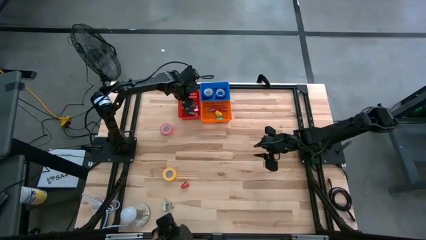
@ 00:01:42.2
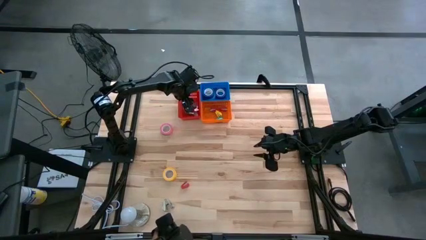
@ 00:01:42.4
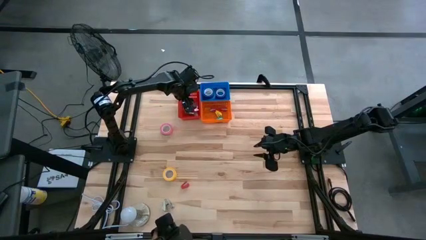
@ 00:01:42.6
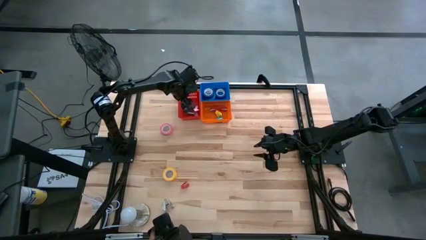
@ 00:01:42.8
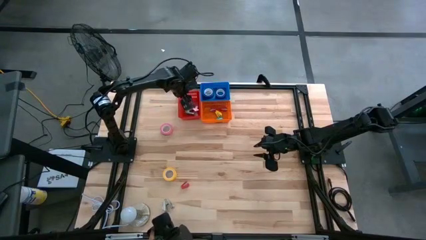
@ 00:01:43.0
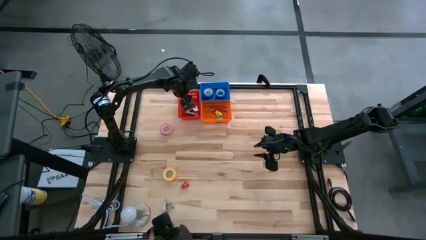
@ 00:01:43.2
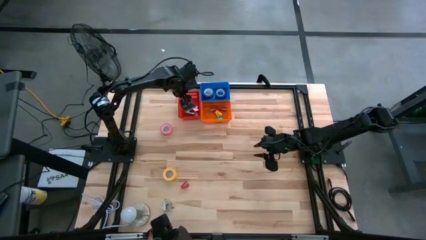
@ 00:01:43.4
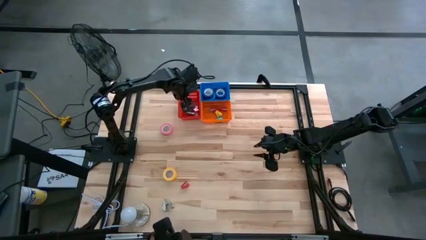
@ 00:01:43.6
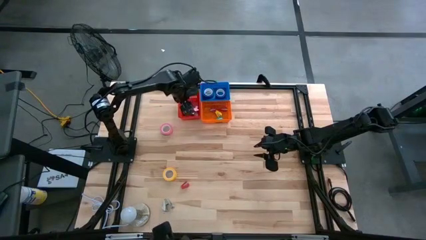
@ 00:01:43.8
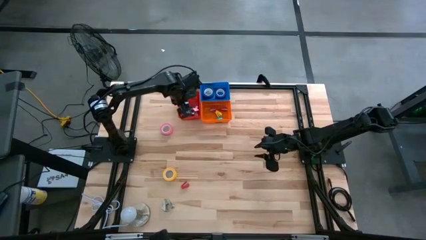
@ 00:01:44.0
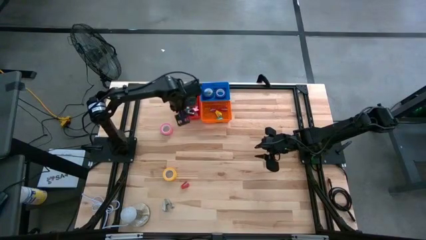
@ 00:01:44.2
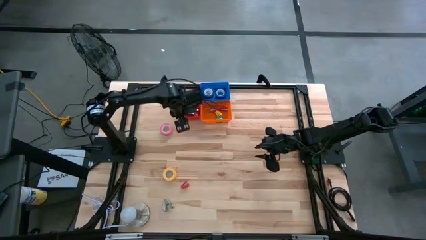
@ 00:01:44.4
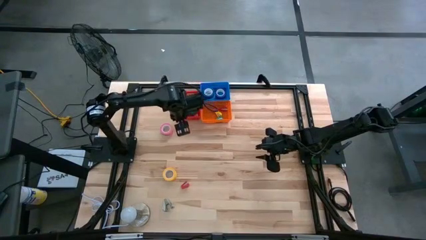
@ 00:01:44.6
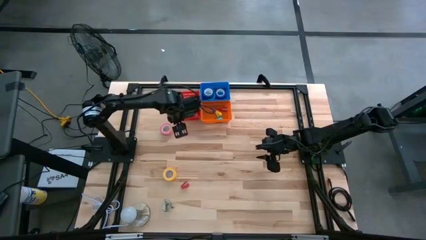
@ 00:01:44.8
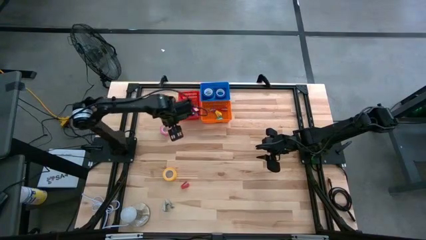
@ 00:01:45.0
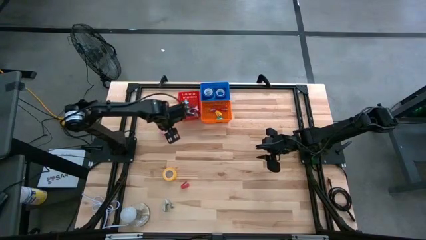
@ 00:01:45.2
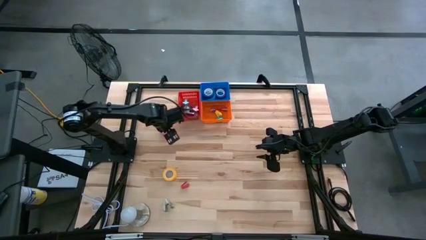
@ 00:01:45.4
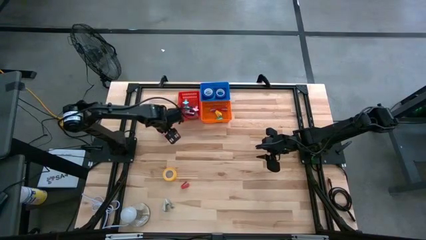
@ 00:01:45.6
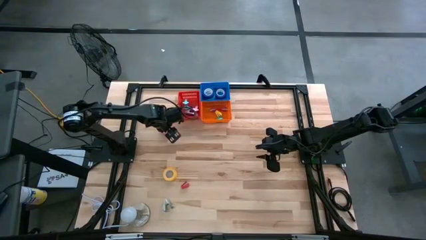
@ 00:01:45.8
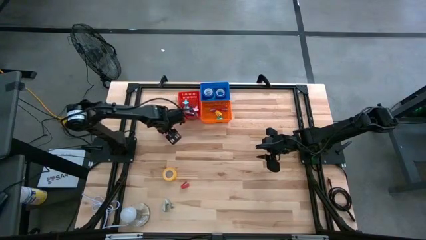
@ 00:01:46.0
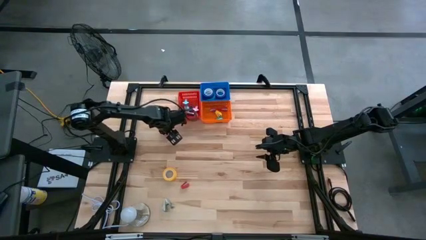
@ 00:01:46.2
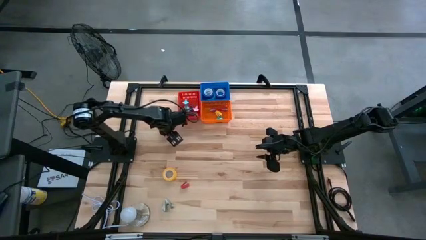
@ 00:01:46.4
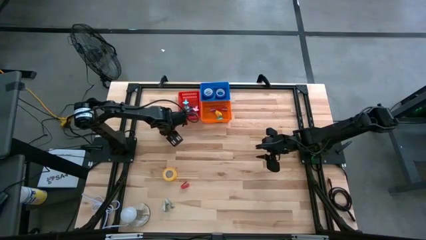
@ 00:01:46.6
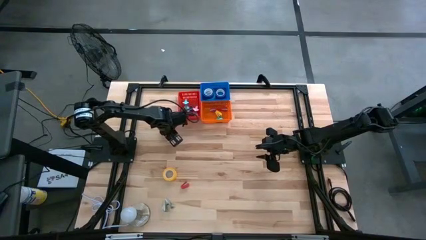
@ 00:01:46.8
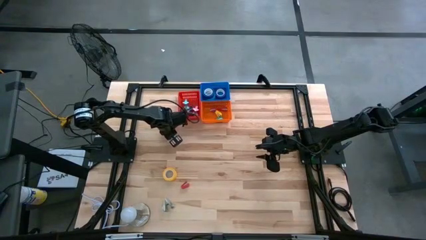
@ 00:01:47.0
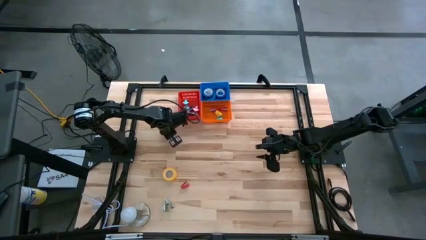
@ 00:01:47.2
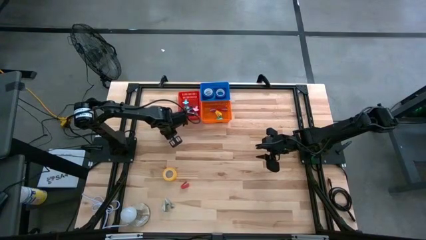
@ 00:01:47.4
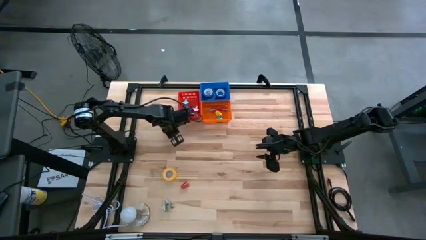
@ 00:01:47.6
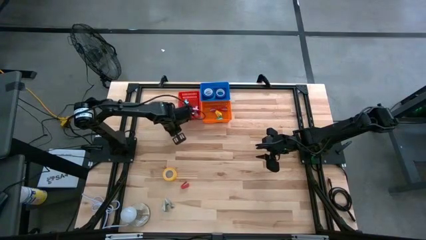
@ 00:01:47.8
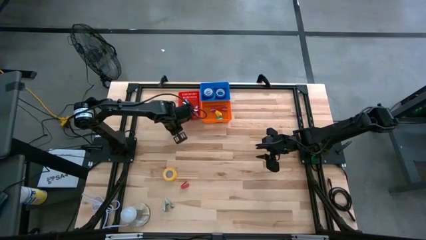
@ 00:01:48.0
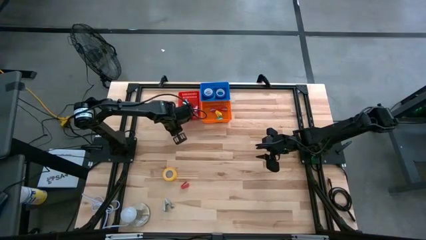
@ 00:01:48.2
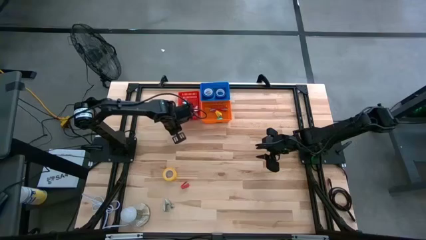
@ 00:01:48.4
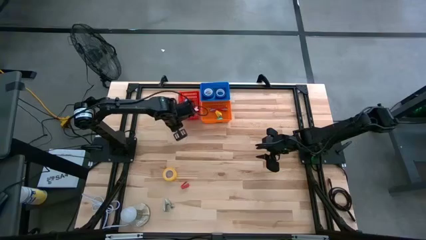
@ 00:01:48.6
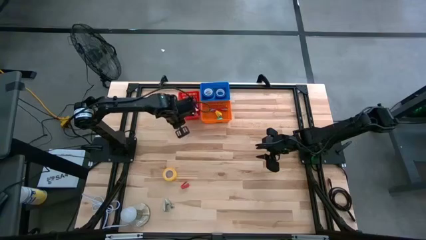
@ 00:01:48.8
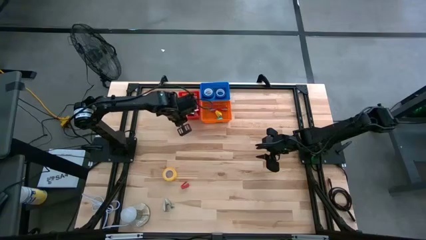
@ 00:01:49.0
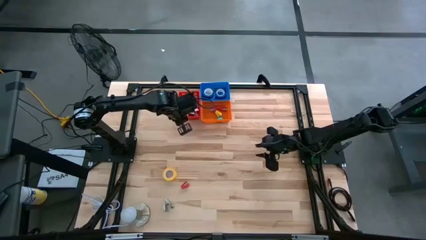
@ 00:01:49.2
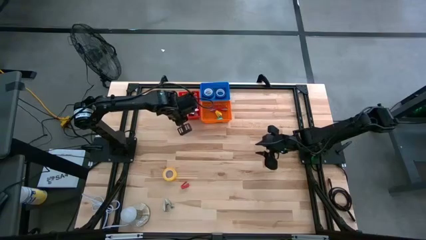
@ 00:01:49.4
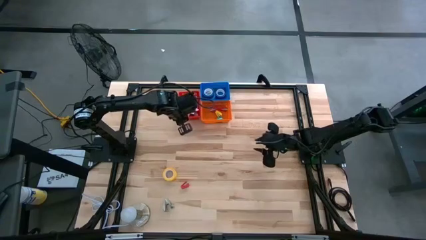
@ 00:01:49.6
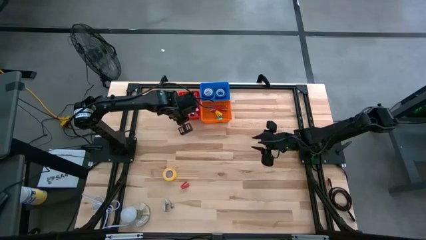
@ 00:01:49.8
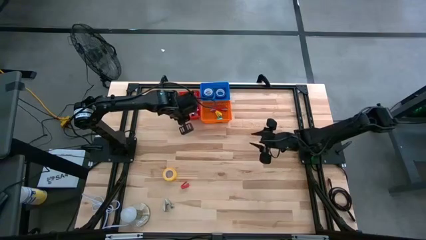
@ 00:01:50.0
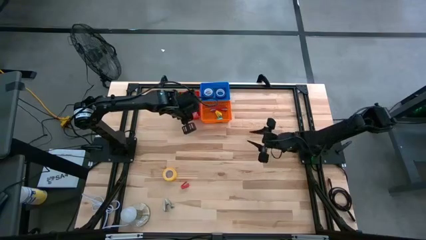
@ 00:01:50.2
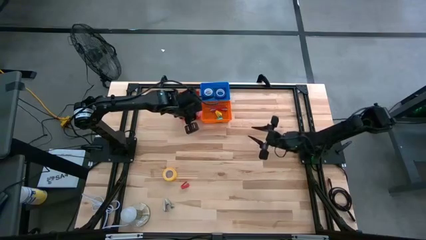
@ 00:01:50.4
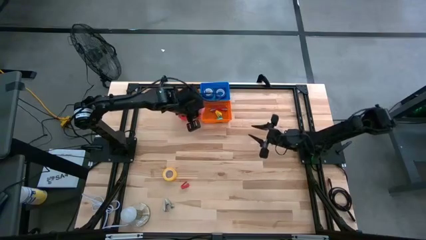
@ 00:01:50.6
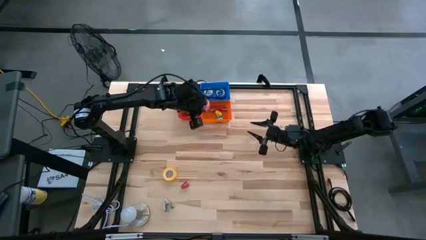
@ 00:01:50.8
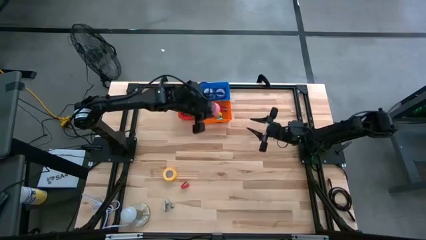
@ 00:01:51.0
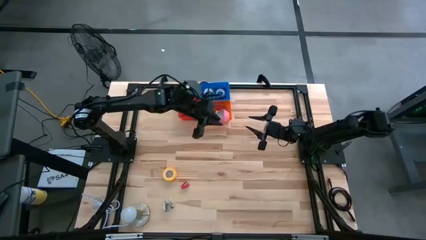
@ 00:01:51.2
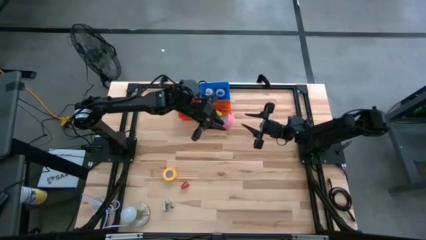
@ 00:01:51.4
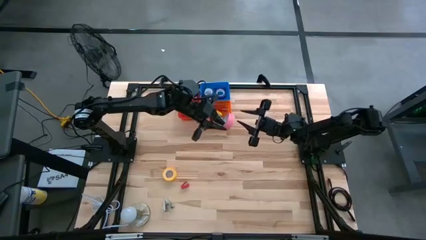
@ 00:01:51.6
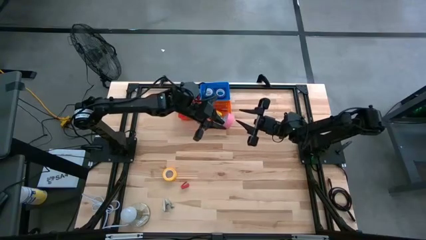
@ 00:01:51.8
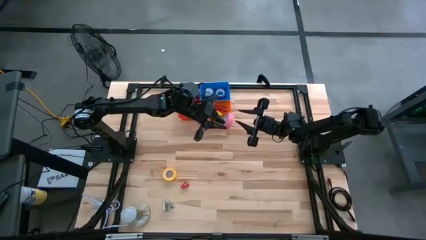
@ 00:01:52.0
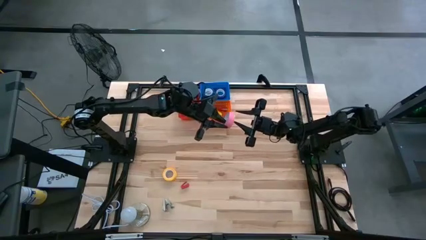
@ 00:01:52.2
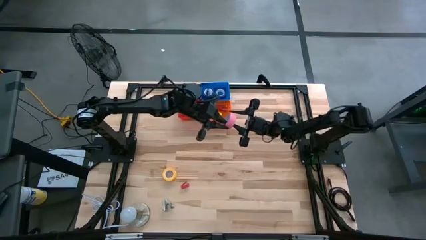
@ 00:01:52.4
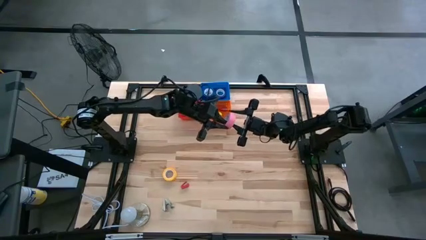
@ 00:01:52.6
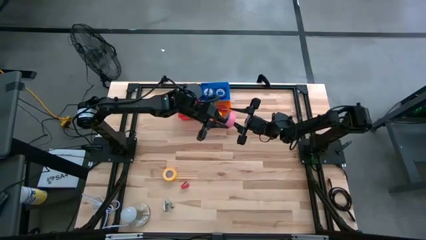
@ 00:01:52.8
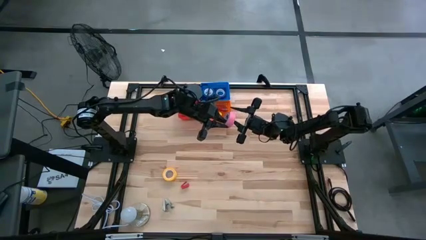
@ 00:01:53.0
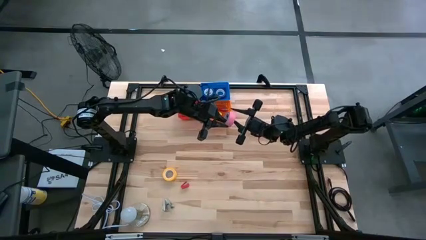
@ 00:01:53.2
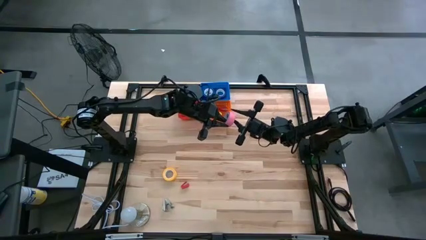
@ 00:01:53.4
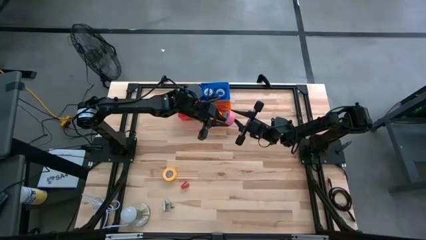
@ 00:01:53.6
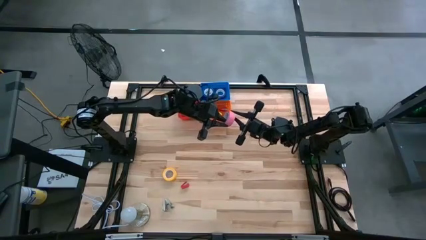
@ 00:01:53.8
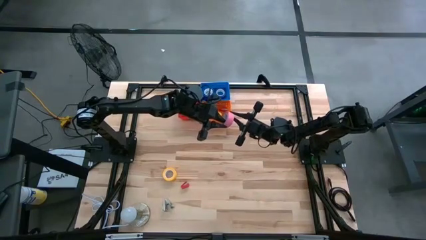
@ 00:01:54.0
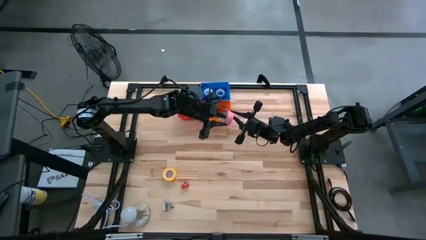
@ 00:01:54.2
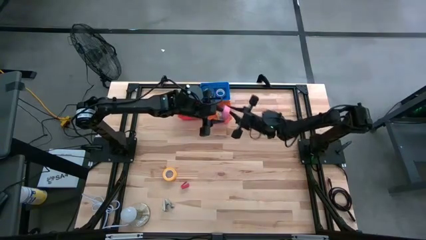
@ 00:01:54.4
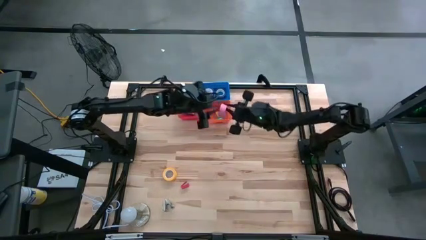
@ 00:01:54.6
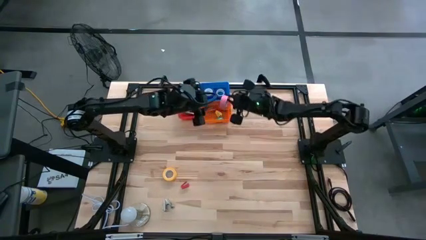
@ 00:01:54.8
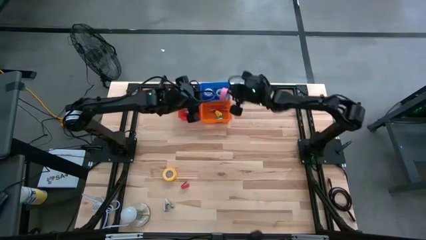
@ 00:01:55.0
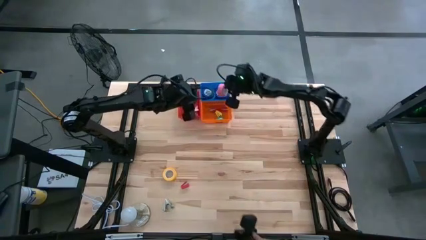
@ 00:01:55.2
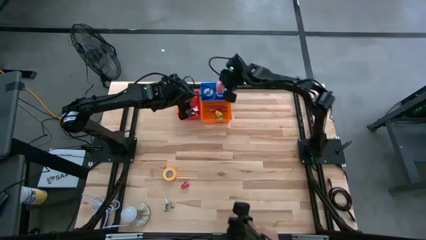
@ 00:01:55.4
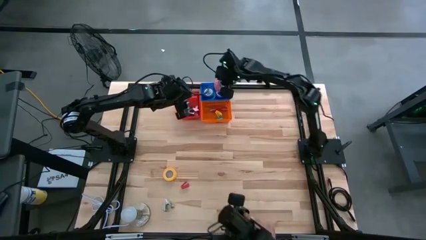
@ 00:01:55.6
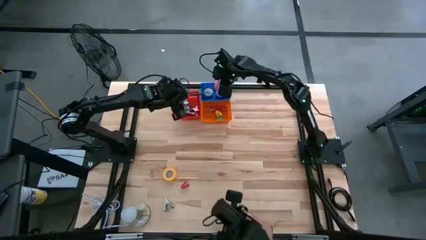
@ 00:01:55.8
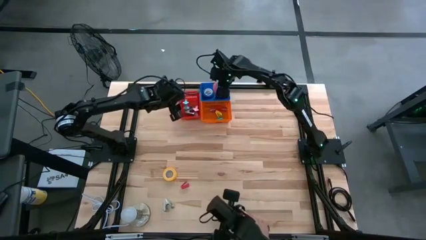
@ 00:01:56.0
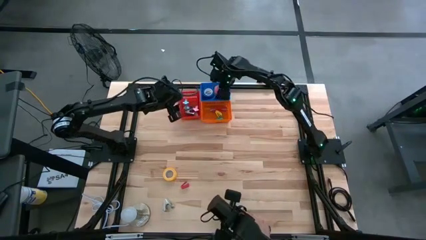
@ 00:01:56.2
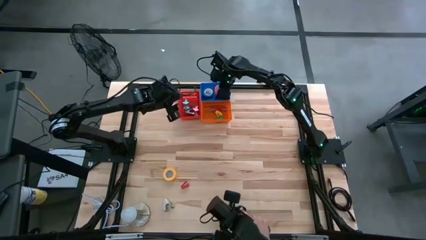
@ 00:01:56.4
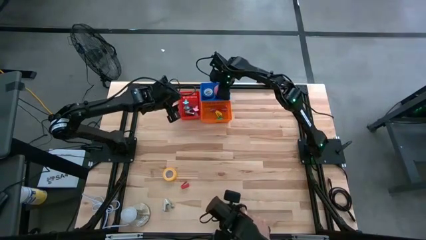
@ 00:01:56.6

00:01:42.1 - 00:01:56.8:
Task: Pick and place Stapler, Stapler remover, tape
Put the pink tape into the blue bin
